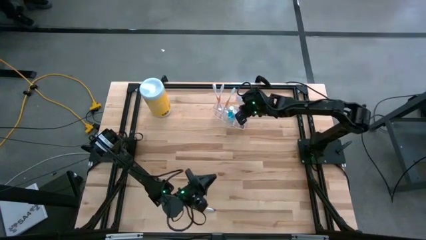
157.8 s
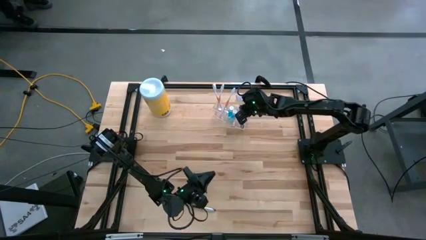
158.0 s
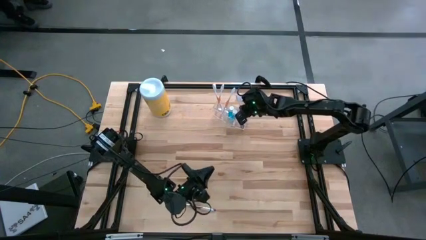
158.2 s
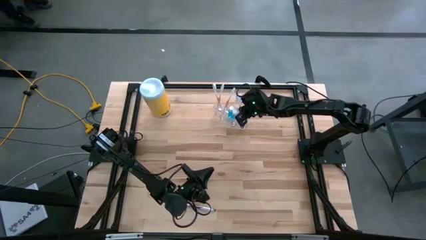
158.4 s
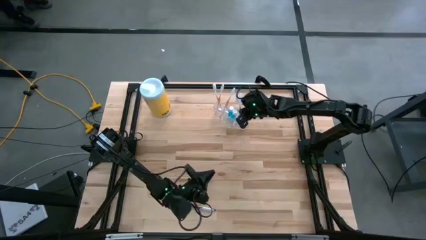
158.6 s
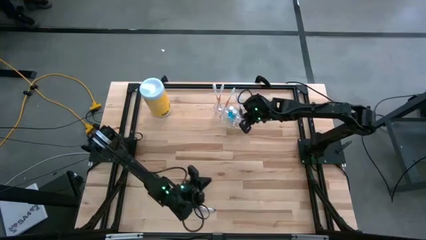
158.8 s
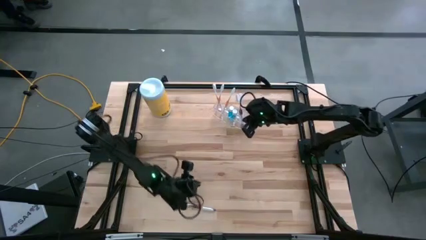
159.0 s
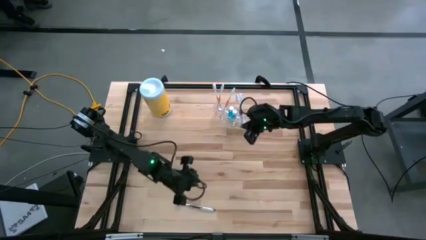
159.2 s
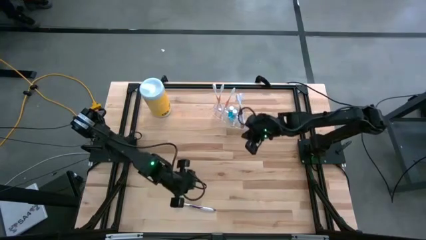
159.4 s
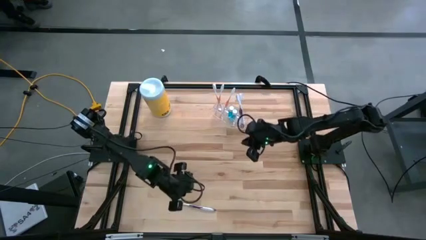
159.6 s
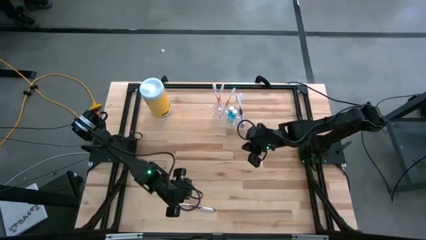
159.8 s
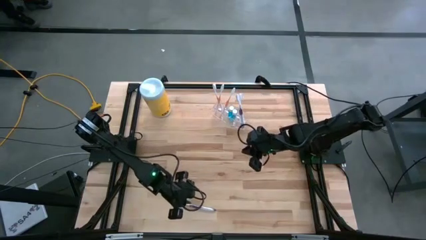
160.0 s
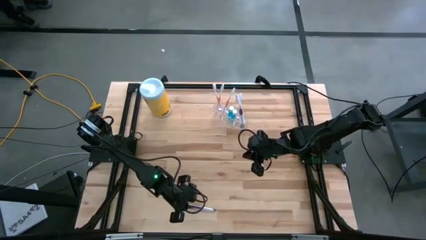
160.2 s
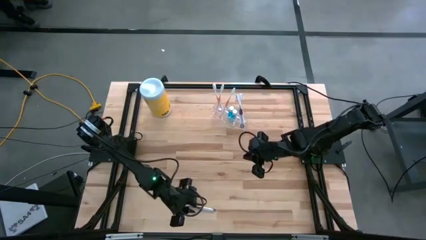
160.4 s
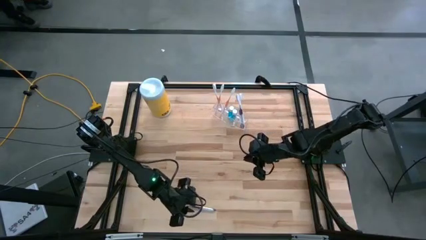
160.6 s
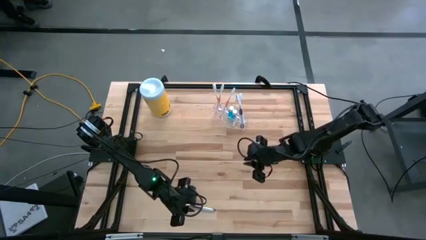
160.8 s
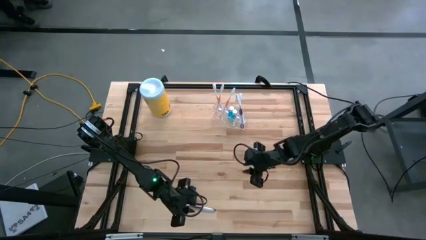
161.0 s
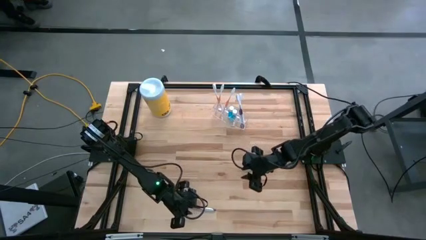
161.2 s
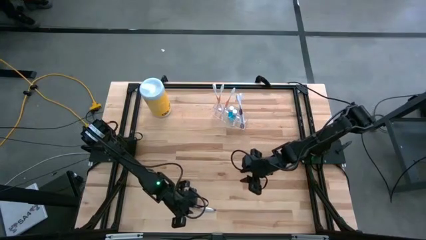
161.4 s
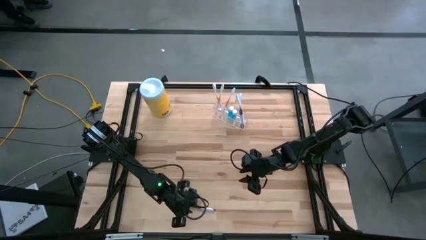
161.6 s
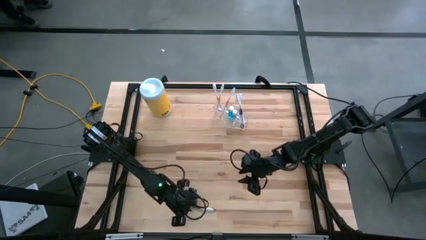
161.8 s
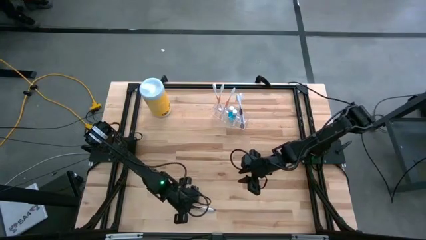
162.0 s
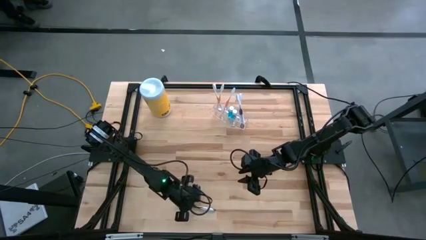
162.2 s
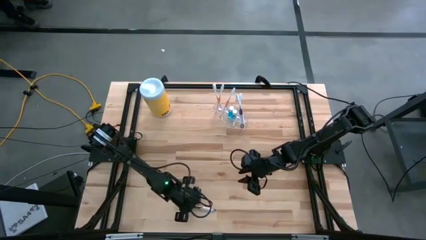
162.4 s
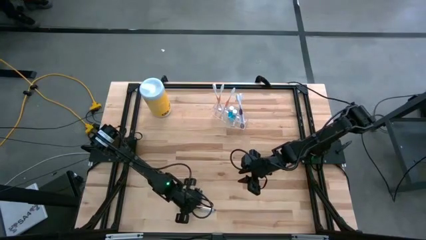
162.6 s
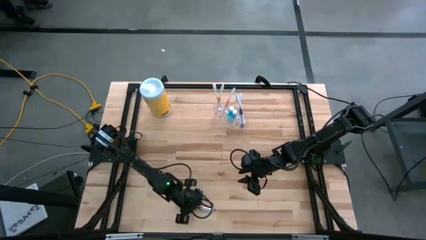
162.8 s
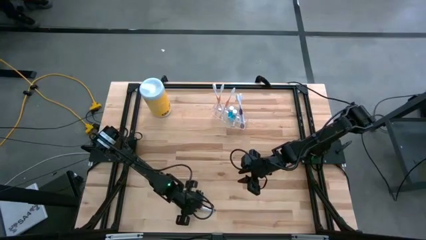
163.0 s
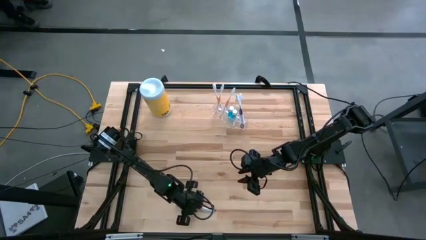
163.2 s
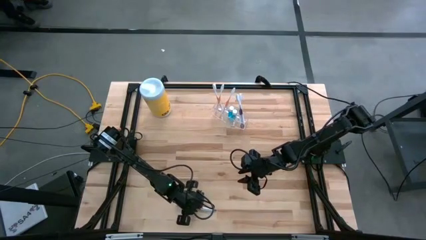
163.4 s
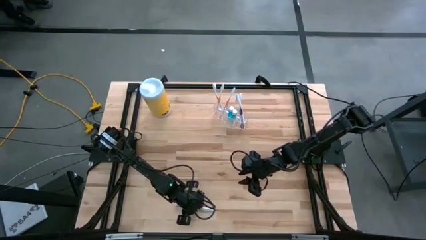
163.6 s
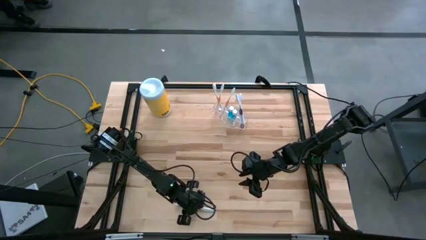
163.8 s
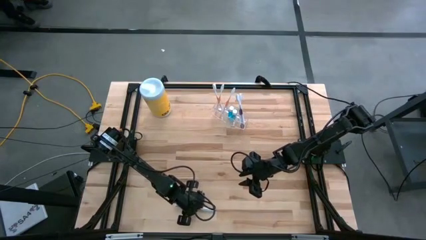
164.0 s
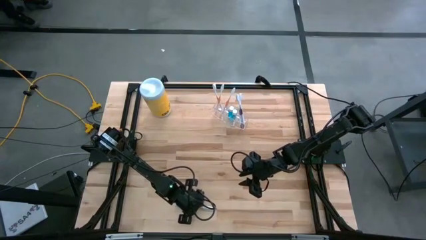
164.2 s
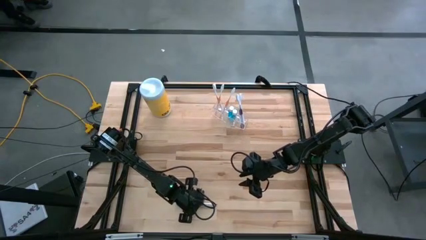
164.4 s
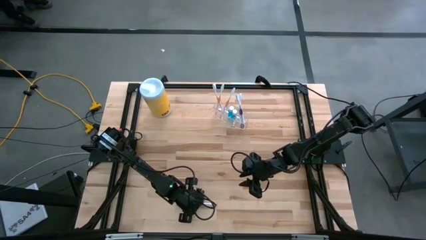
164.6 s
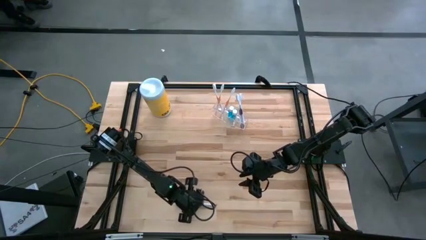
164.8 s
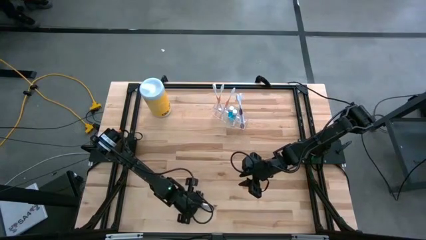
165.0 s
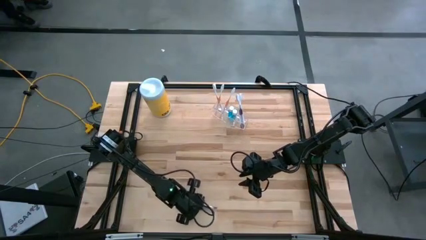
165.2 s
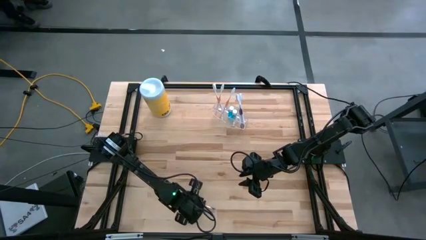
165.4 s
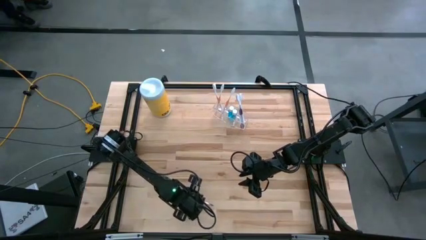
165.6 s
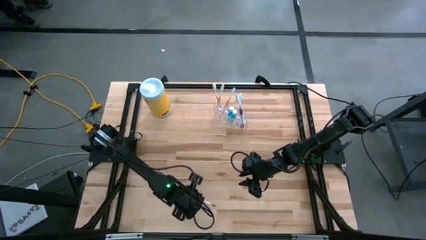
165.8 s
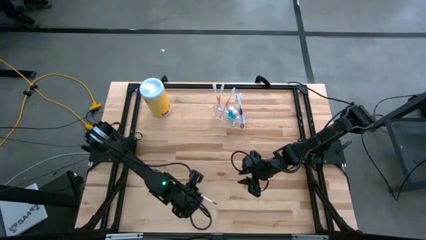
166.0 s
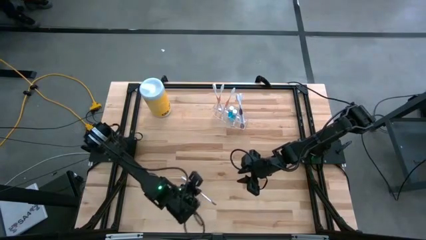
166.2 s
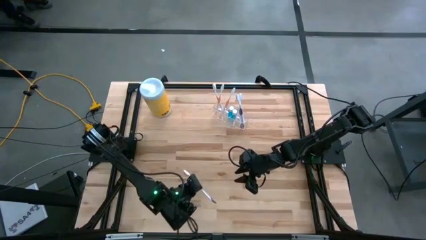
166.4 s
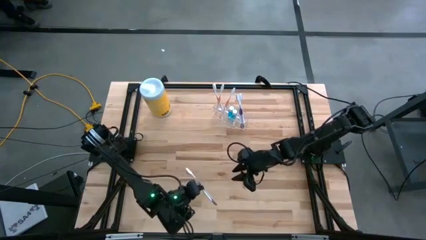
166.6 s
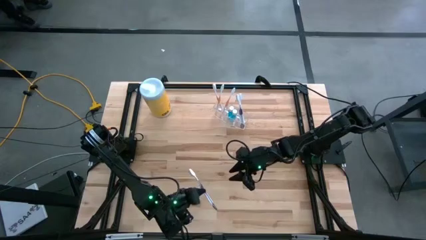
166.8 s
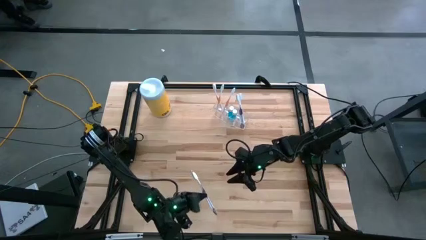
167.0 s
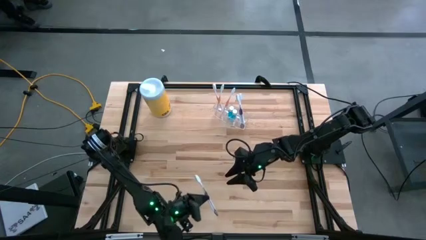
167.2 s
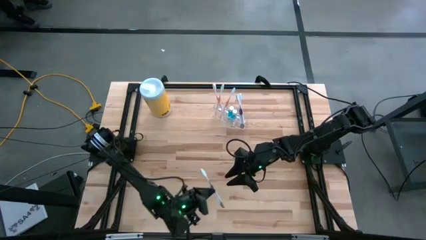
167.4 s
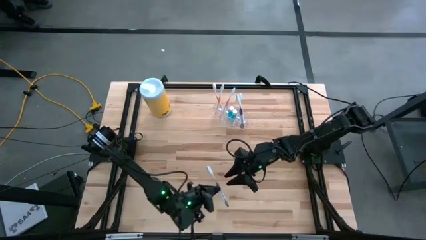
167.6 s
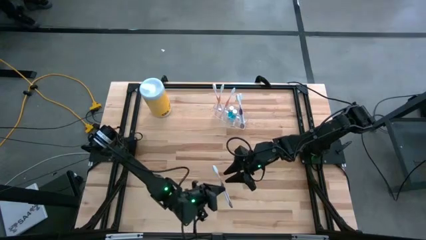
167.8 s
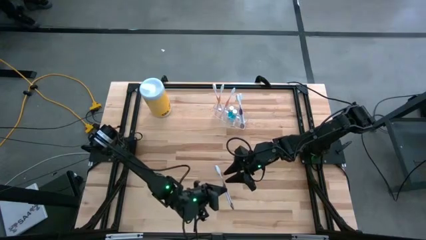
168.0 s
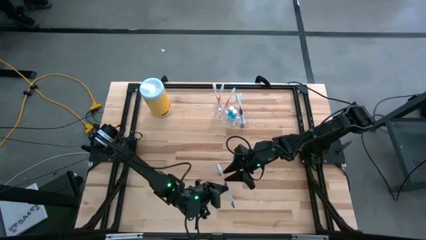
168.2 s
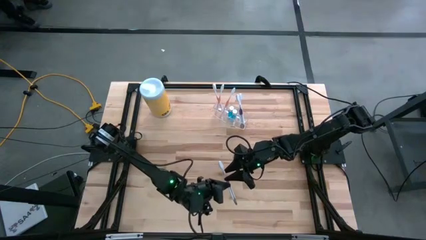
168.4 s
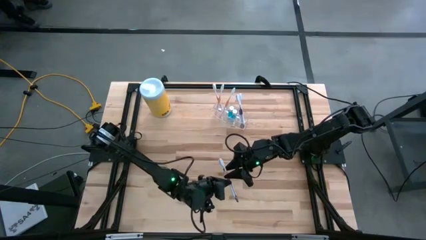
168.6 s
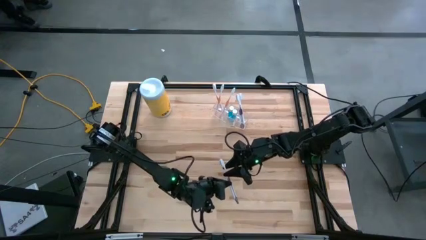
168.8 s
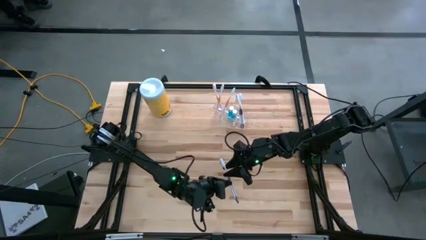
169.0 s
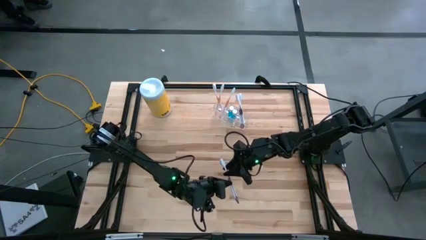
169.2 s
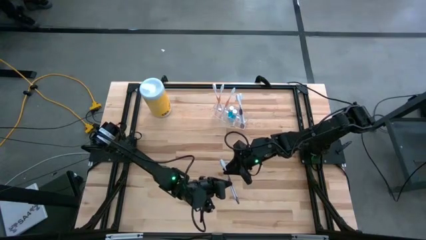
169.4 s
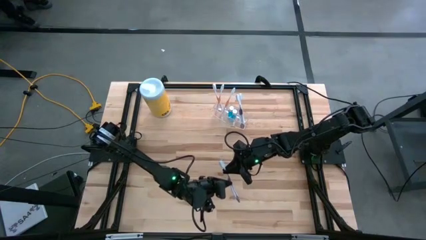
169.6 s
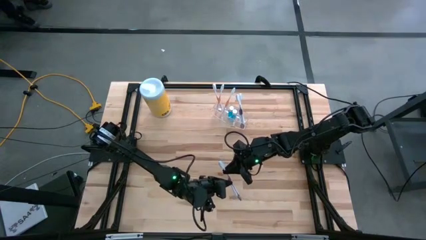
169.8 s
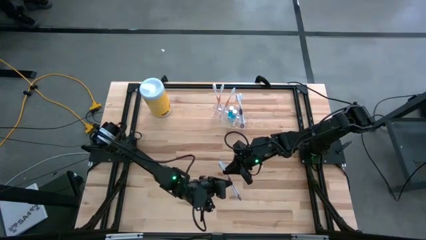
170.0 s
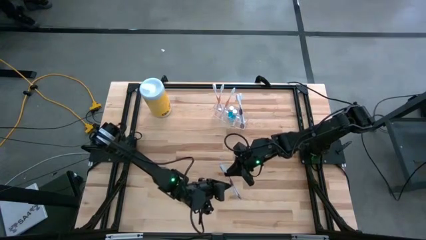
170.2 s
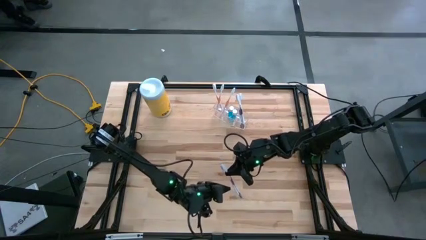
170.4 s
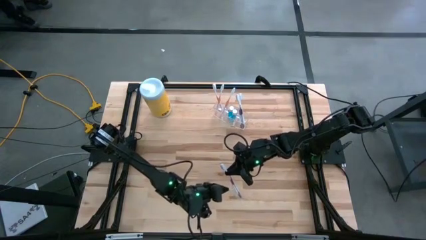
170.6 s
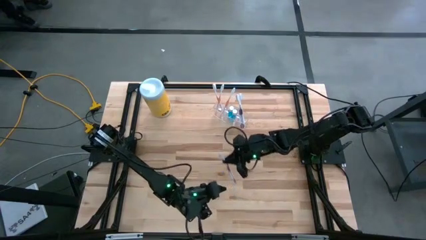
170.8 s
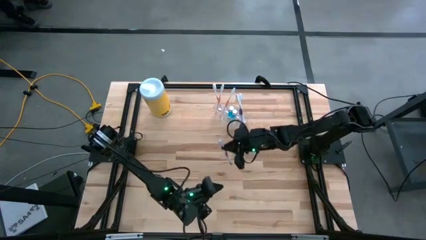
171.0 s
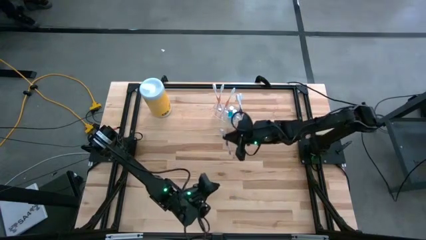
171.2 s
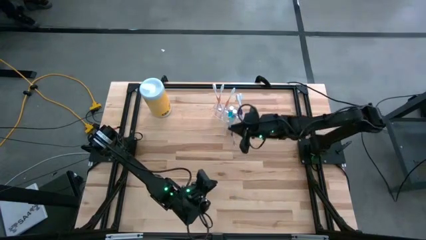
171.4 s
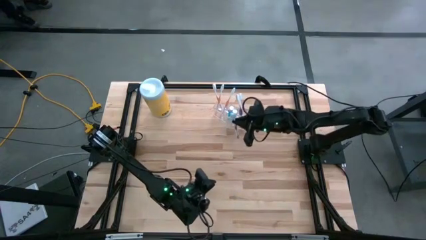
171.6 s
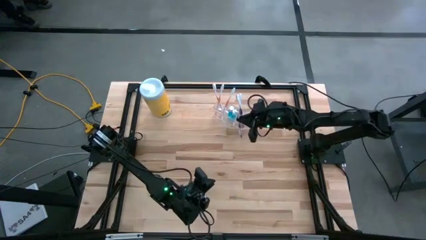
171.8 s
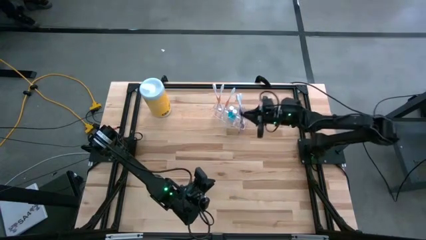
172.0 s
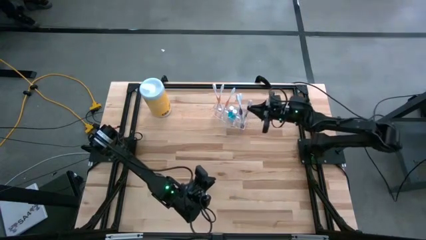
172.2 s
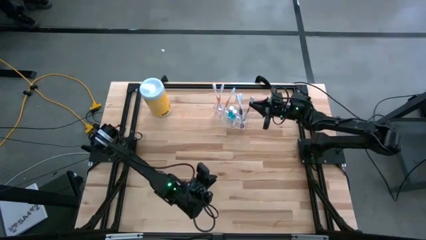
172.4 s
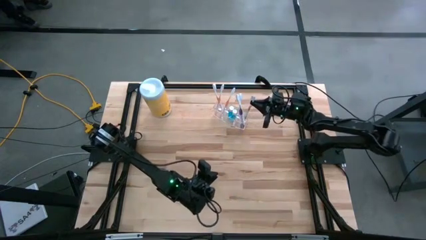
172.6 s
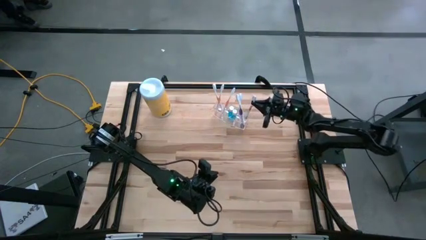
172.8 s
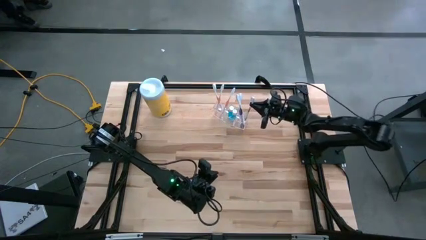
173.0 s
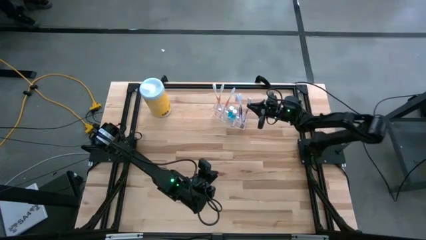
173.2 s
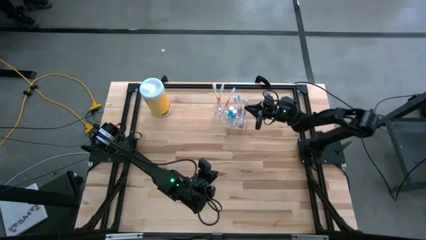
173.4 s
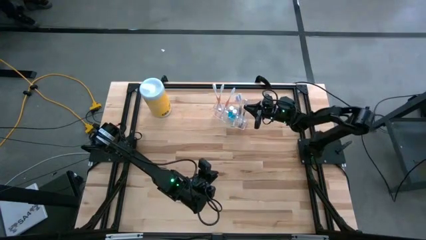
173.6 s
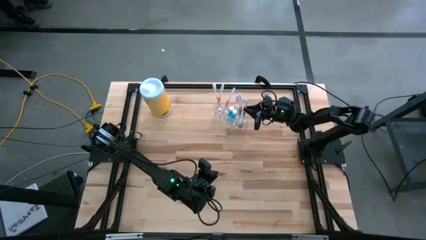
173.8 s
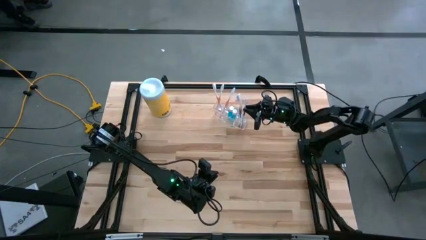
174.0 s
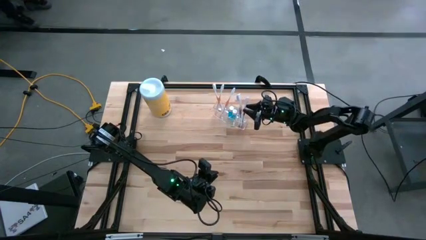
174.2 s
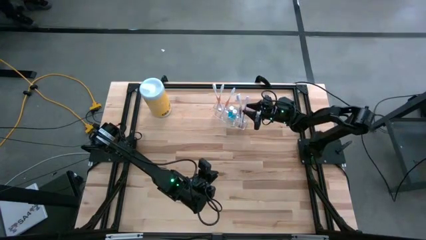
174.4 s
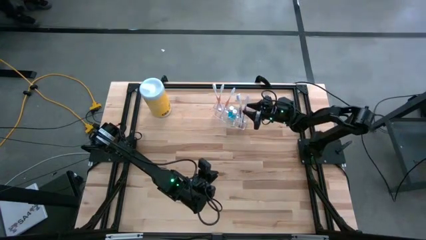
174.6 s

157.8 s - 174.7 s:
Task: Pick & Place toothbrushing station
Put the purple toothbrush into the transparent organizer
